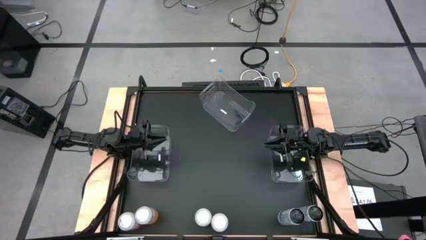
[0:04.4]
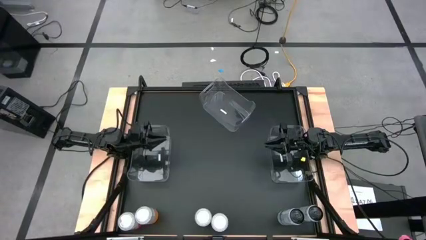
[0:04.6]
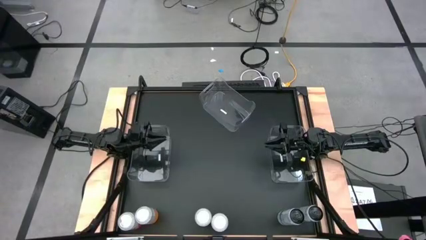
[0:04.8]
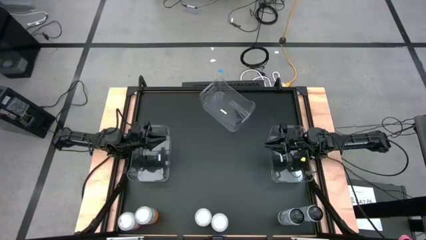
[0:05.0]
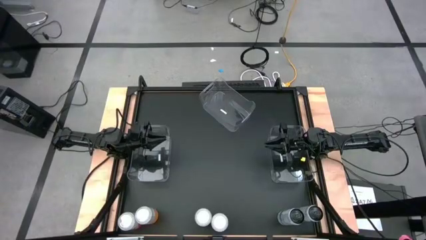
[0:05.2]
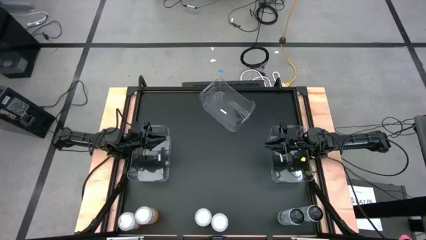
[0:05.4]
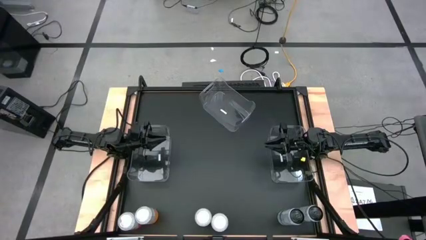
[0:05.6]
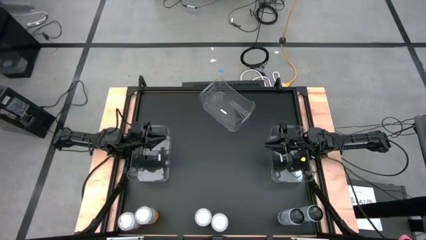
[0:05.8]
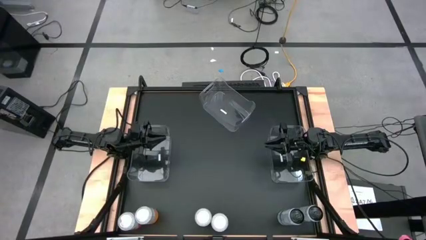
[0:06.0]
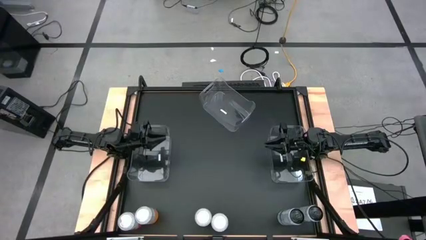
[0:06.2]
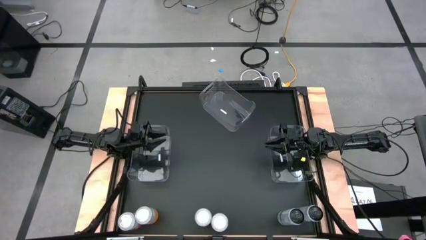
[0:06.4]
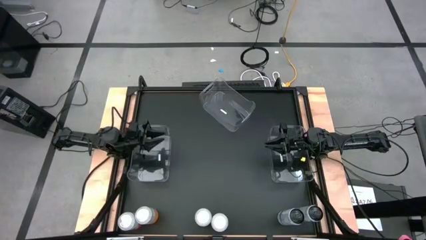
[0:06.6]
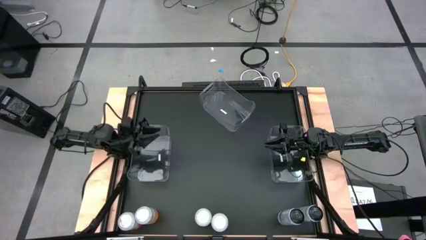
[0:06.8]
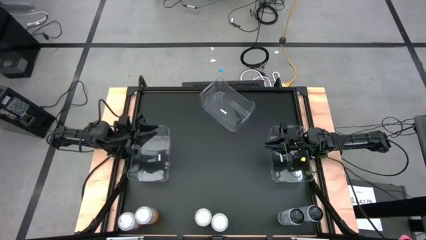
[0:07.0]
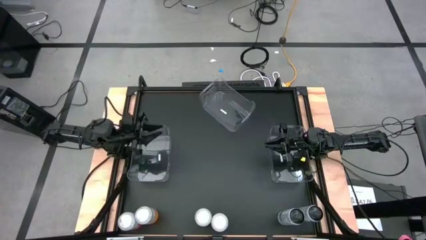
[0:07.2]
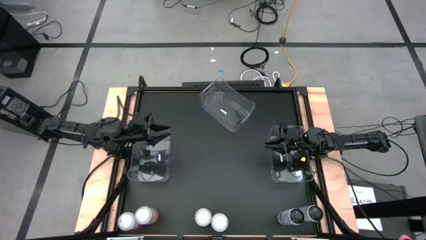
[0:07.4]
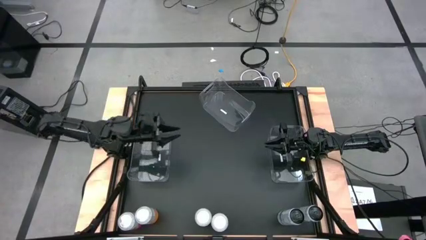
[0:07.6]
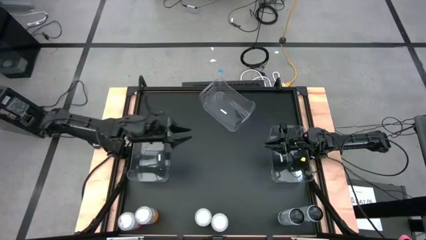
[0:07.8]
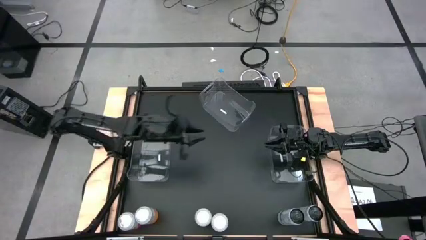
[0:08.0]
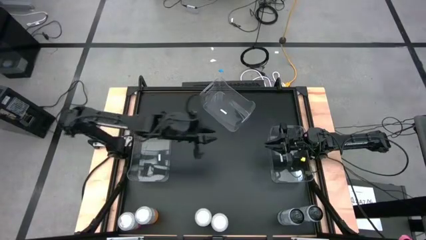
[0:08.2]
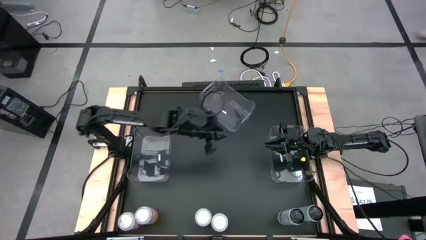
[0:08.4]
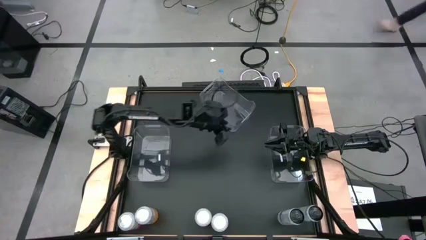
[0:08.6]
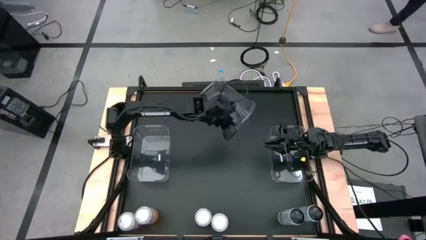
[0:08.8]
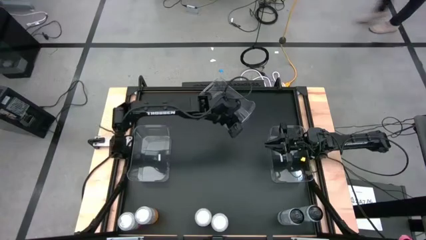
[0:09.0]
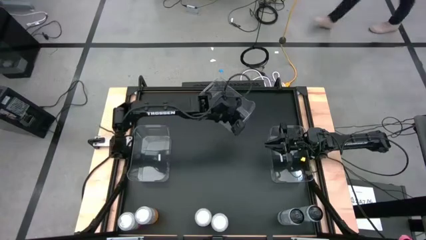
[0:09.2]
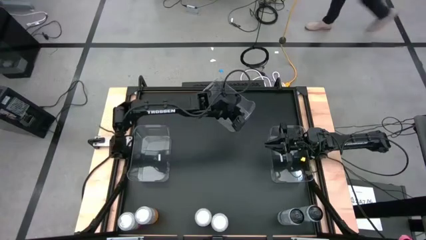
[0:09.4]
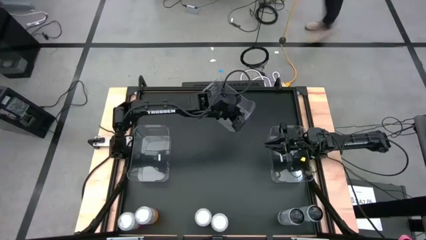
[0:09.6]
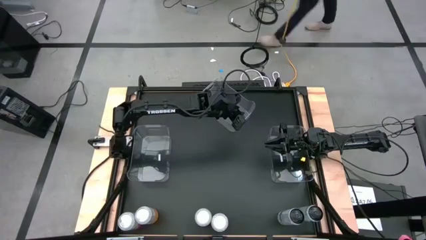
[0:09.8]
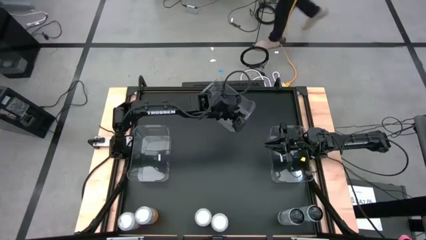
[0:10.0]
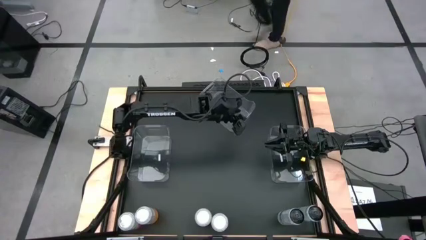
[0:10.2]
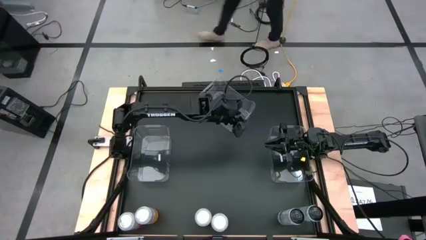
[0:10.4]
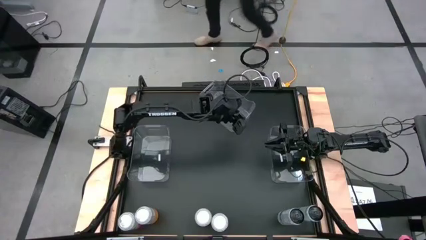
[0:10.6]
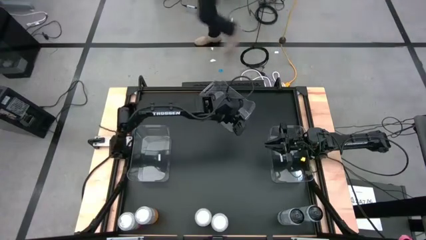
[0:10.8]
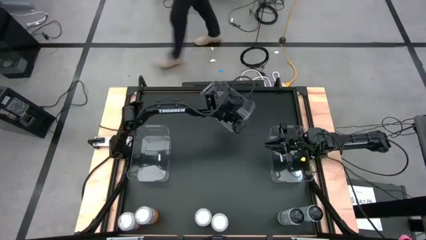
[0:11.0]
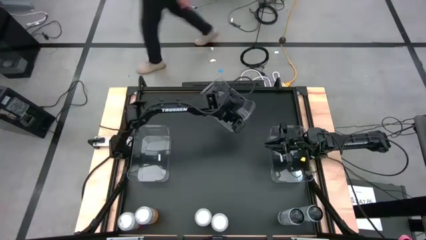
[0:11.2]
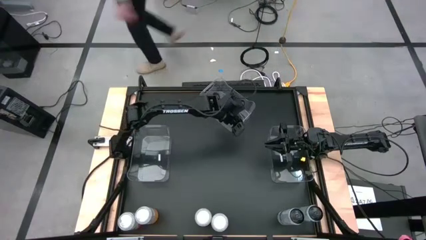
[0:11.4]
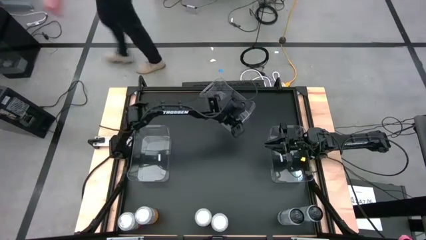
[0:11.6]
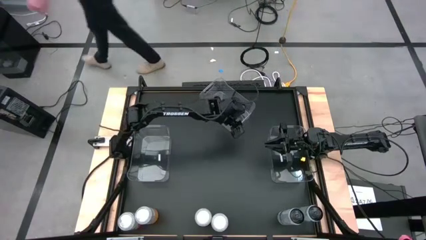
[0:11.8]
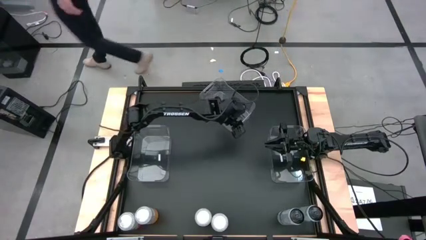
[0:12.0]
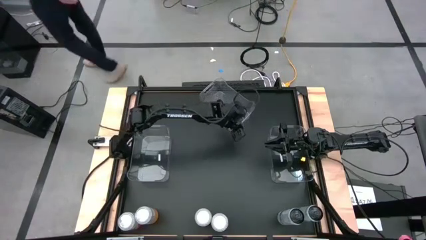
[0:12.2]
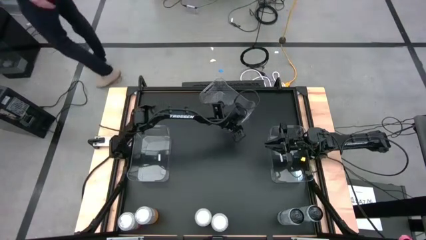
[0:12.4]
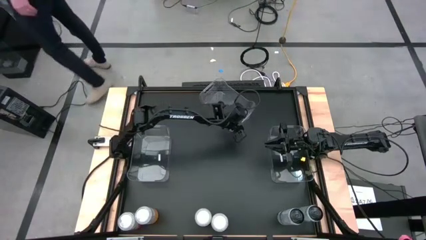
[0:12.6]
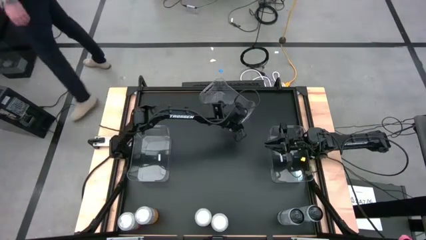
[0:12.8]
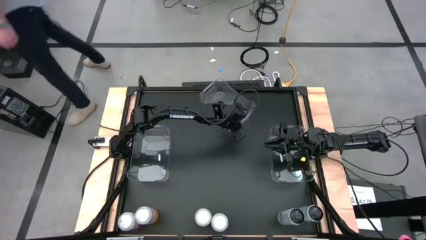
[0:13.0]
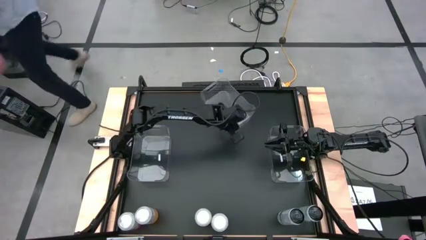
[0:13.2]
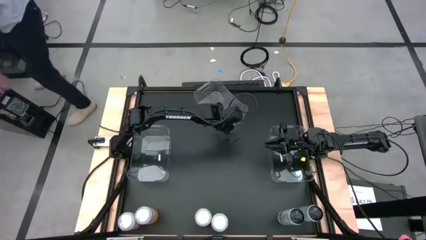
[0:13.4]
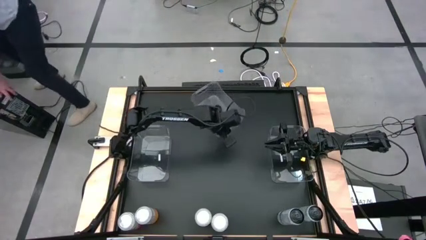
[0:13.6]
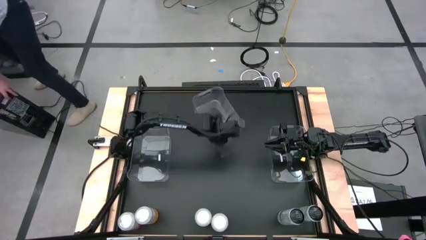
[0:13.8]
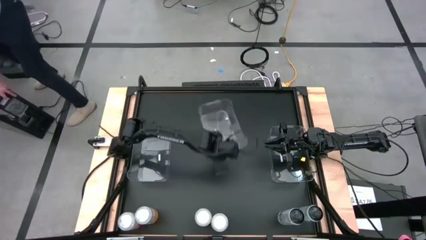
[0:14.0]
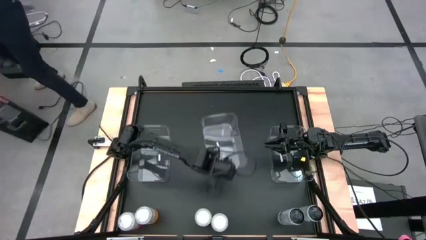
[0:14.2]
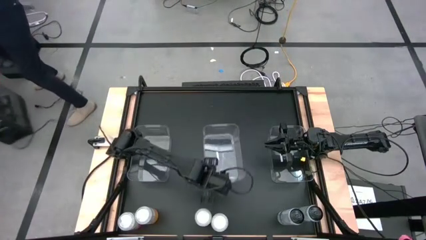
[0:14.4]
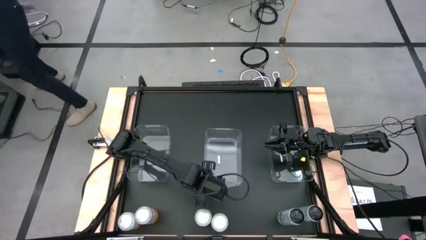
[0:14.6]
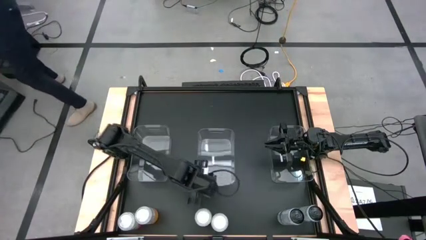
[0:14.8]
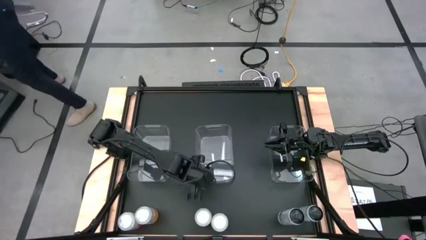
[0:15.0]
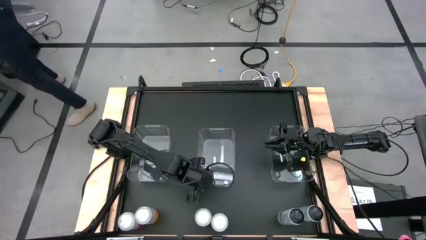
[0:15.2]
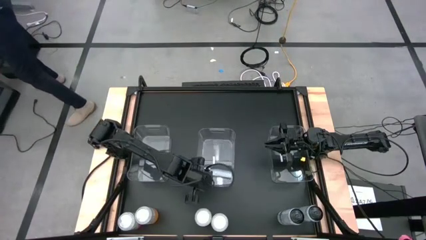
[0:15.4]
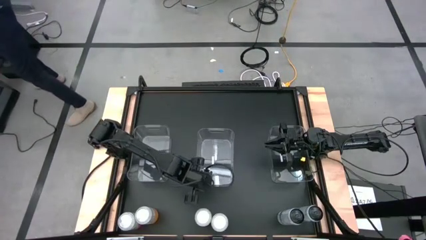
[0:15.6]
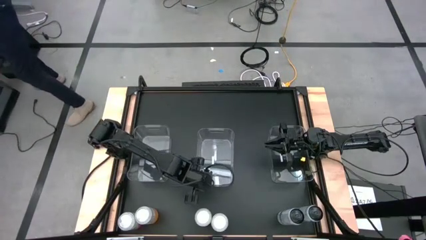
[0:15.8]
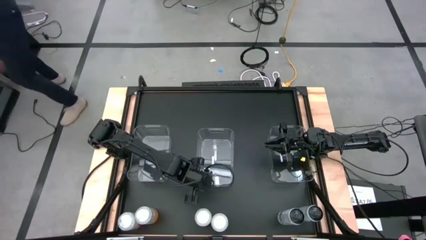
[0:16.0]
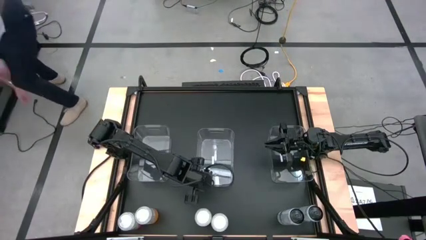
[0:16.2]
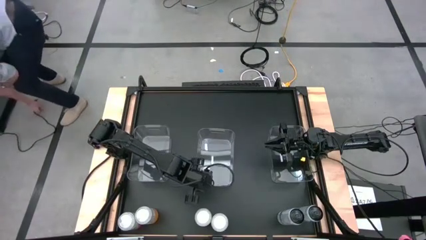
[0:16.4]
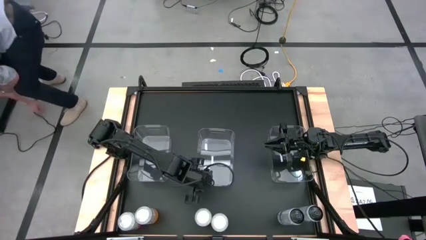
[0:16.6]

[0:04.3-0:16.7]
Task: Sort soda cans
Move the top transparent bin to the center

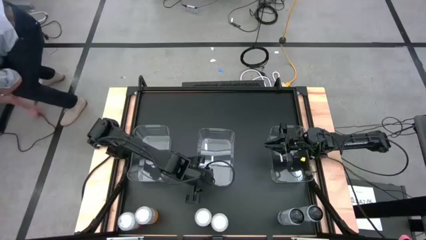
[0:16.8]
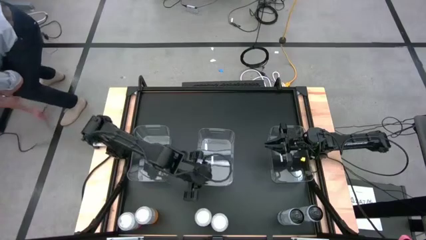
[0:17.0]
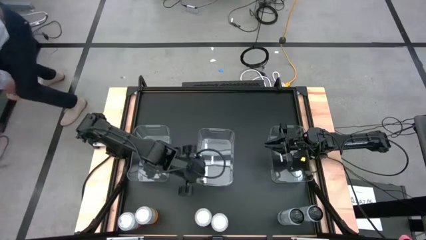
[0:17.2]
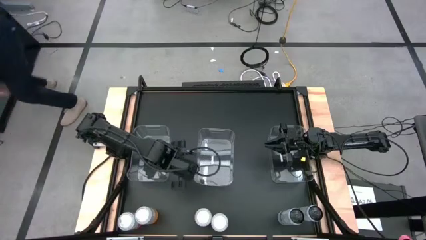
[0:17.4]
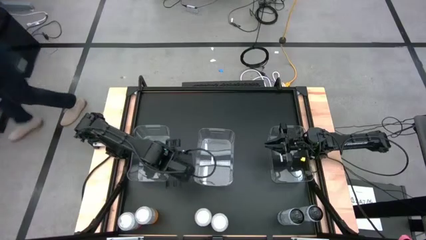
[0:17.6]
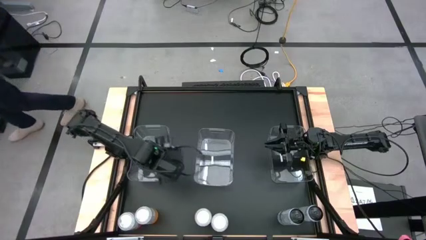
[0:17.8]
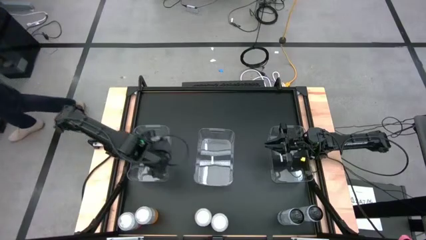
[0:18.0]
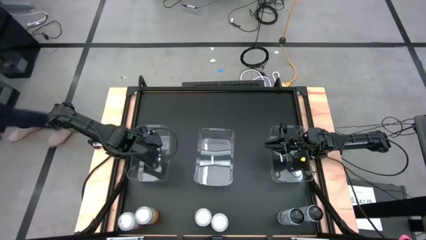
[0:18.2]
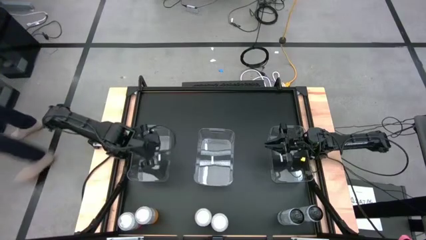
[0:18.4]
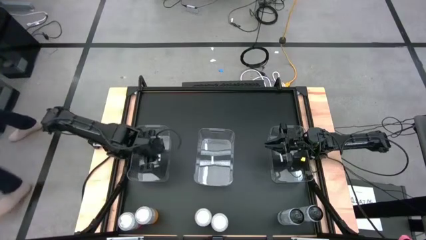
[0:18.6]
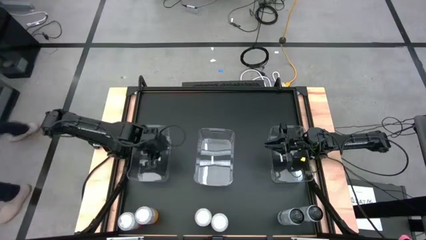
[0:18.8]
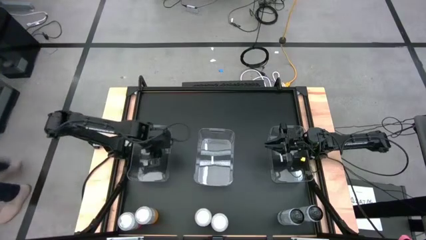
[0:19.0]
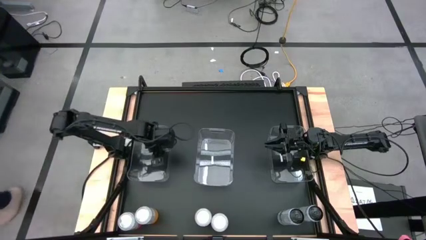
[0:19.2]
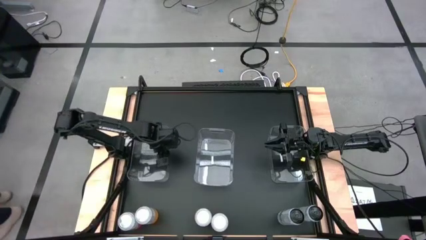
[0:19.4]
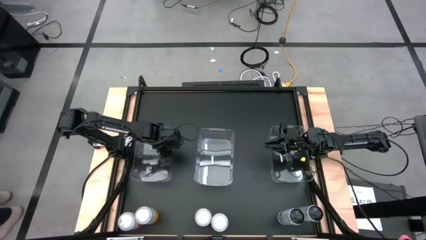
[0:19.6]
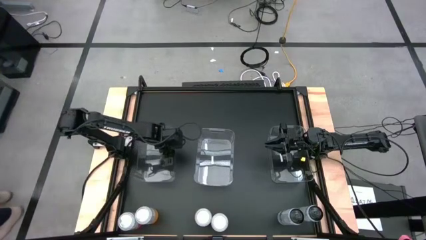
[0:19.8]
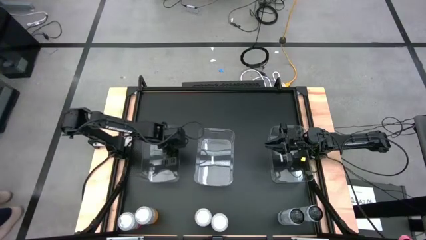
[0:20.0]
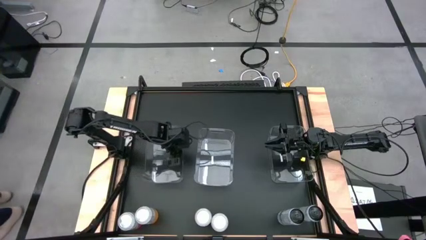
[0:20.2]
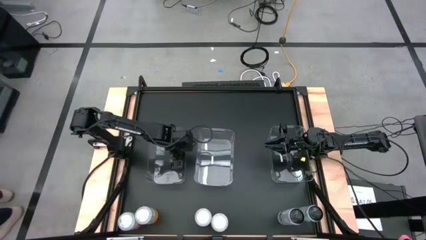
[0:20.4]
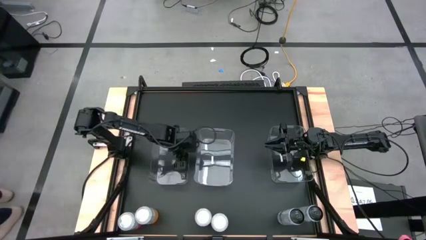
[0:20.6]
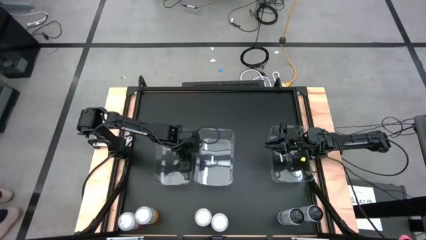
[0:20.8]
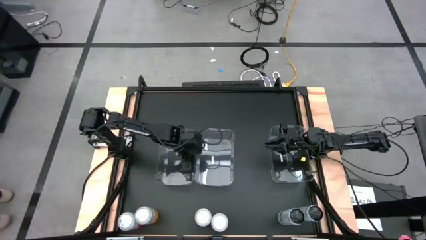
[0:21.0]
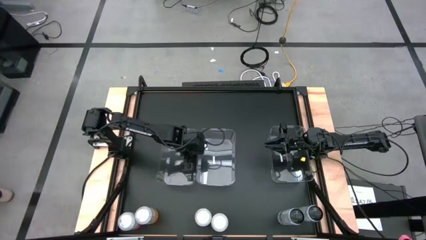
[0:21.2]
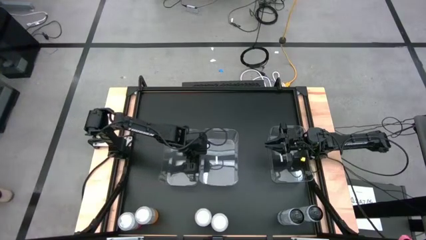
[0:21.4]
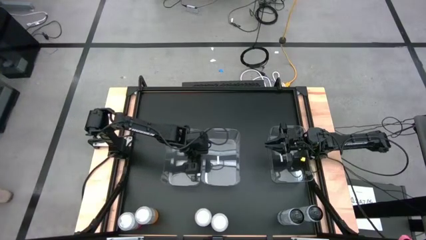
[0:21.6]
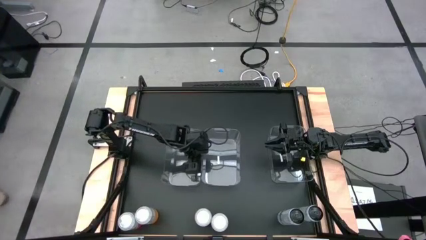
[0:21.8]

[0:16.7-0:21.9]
Move the left transparent bin to the center of the table
